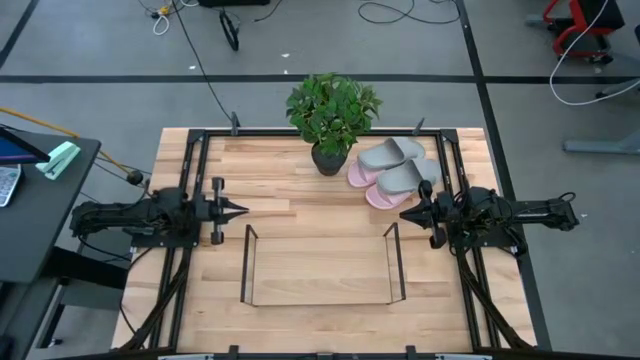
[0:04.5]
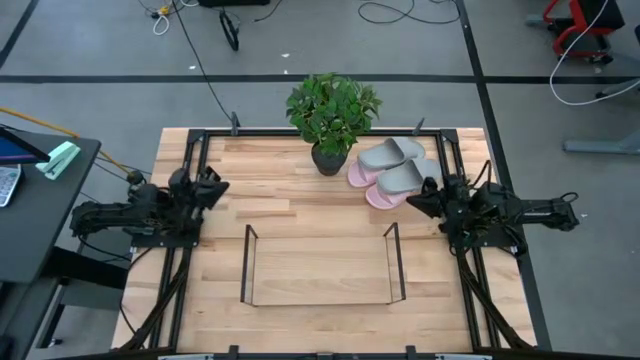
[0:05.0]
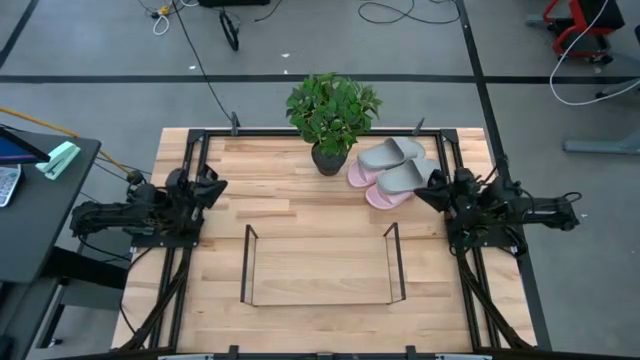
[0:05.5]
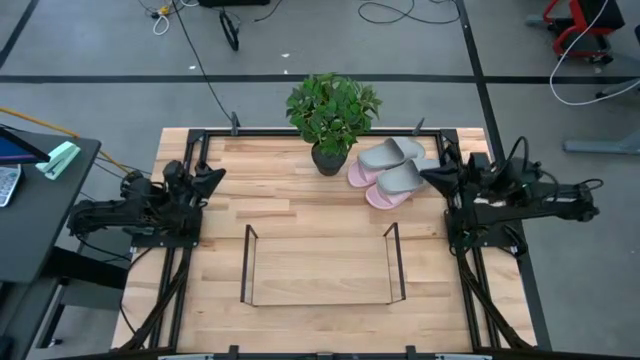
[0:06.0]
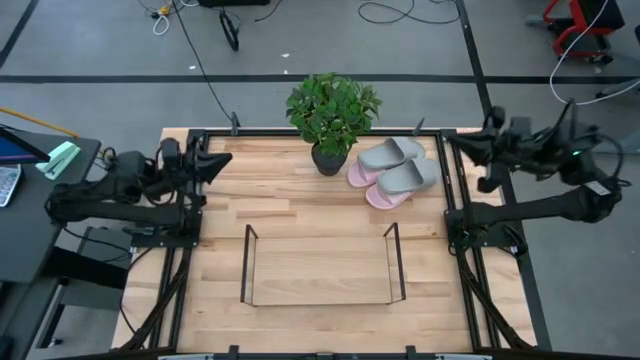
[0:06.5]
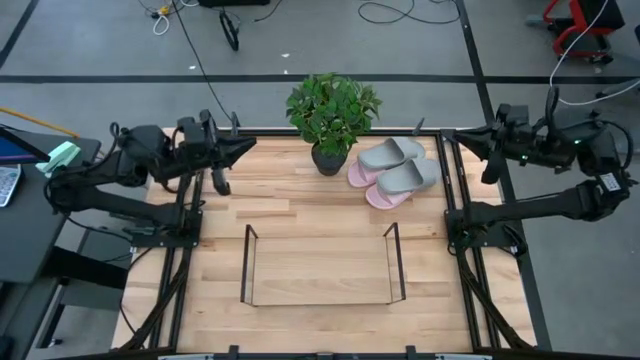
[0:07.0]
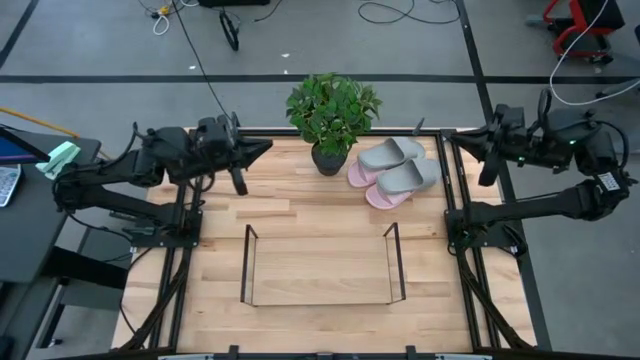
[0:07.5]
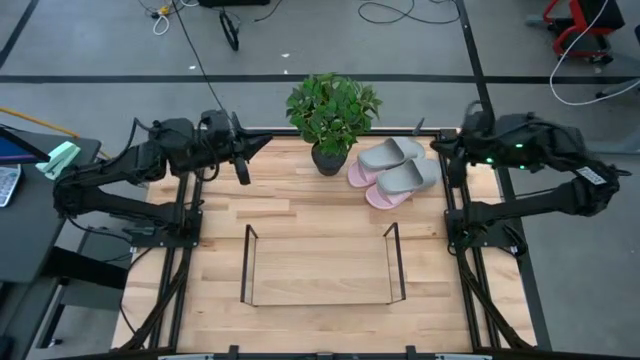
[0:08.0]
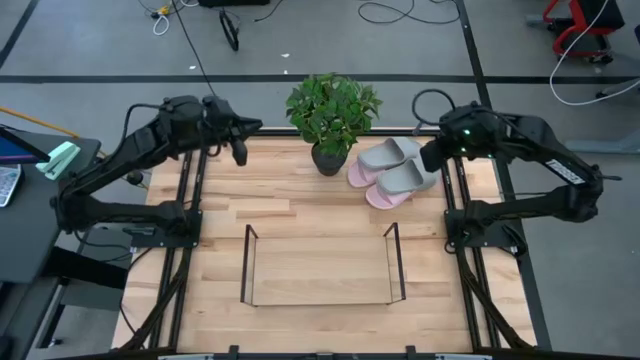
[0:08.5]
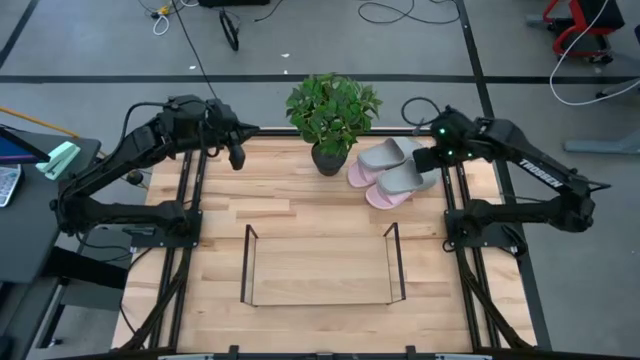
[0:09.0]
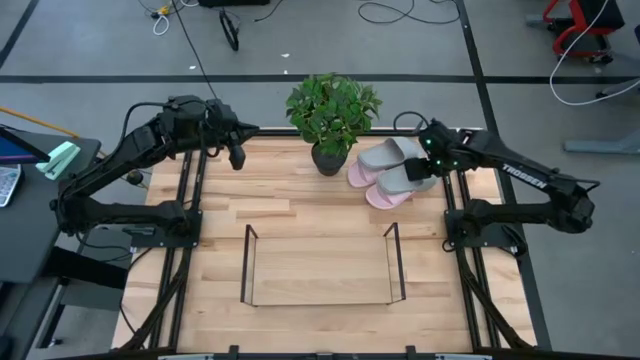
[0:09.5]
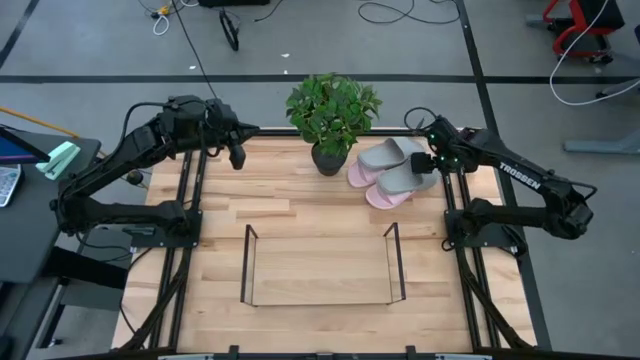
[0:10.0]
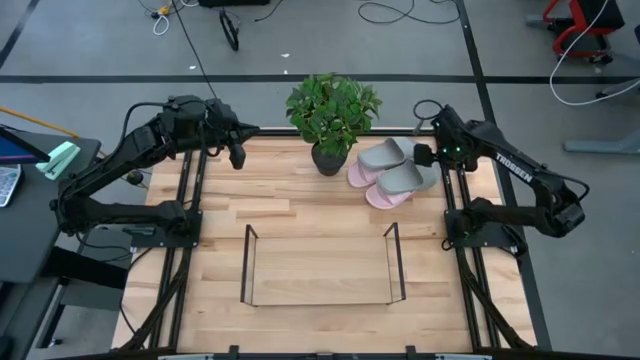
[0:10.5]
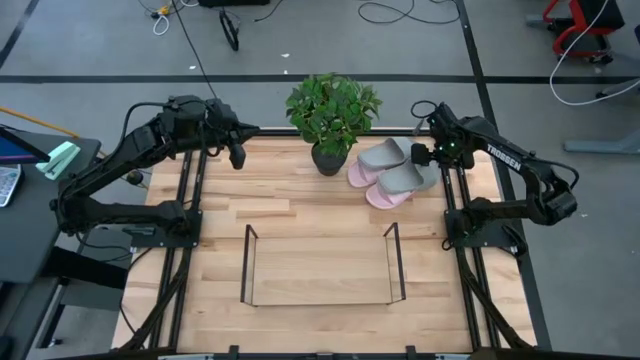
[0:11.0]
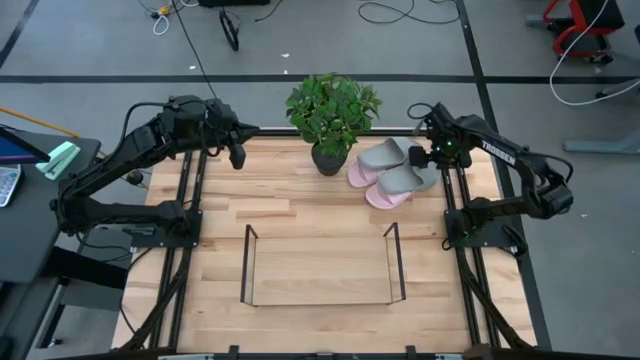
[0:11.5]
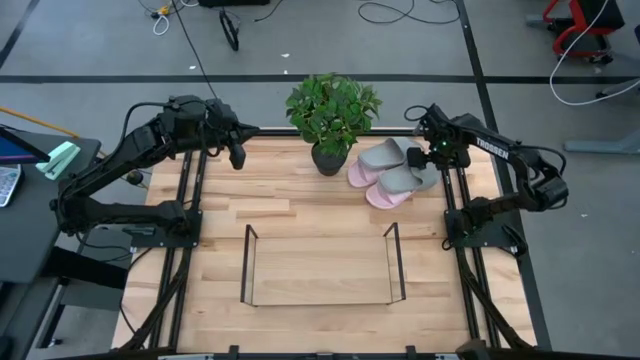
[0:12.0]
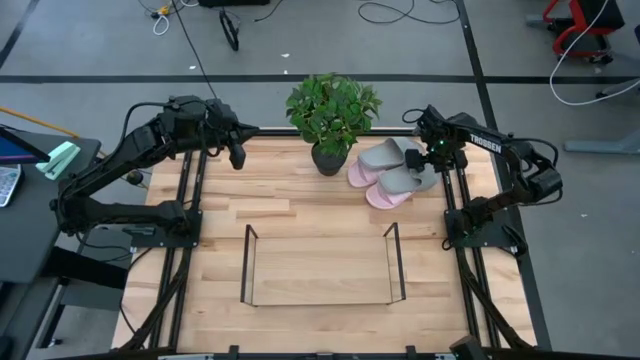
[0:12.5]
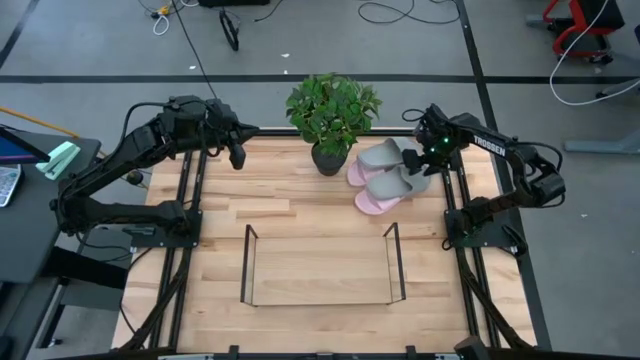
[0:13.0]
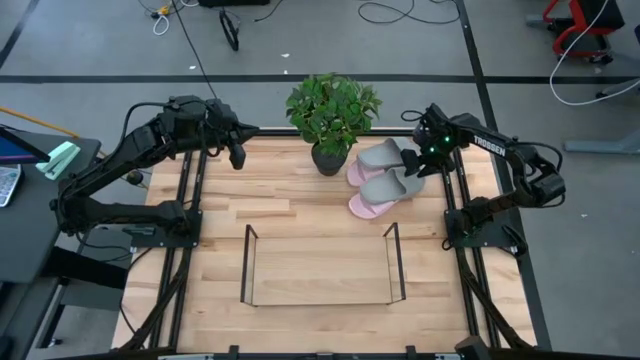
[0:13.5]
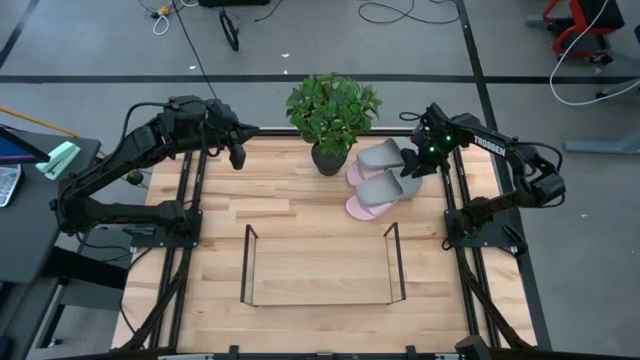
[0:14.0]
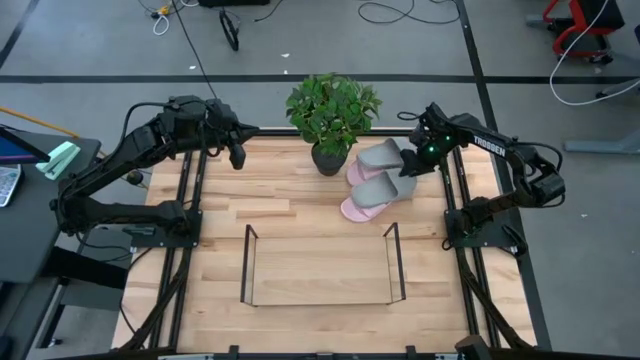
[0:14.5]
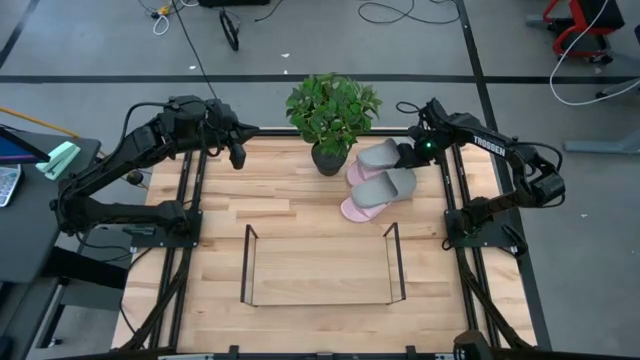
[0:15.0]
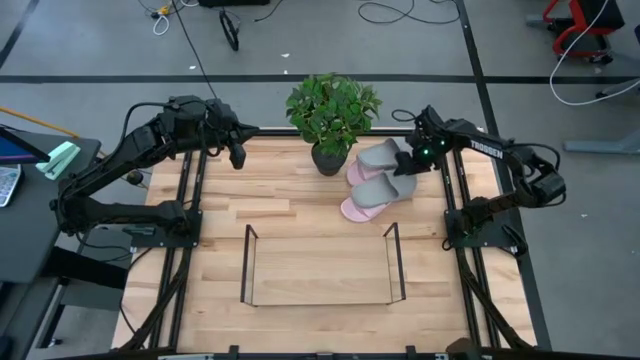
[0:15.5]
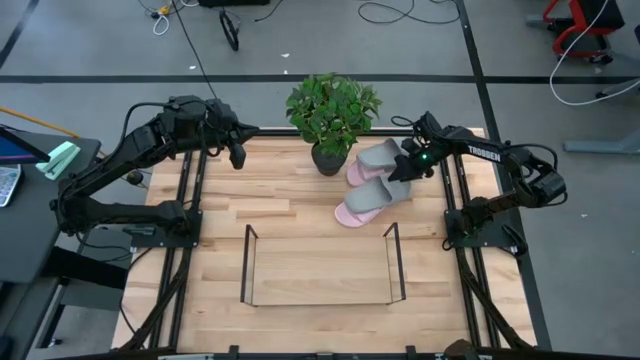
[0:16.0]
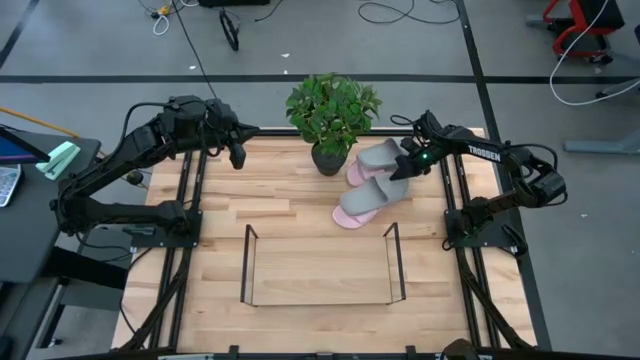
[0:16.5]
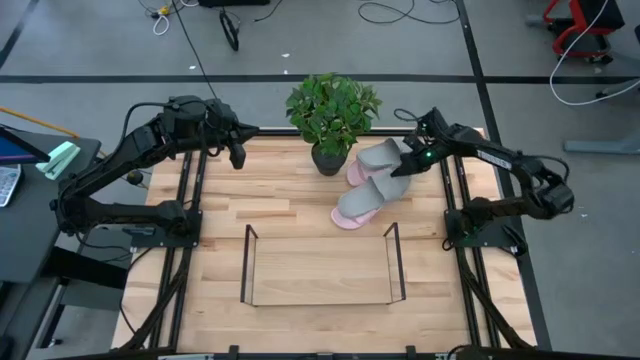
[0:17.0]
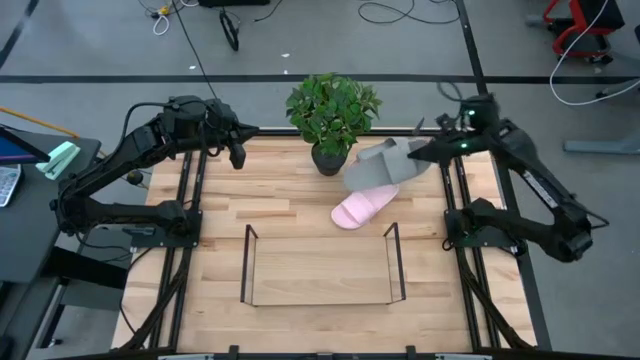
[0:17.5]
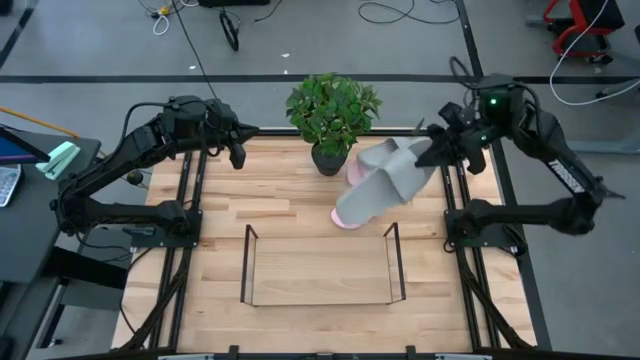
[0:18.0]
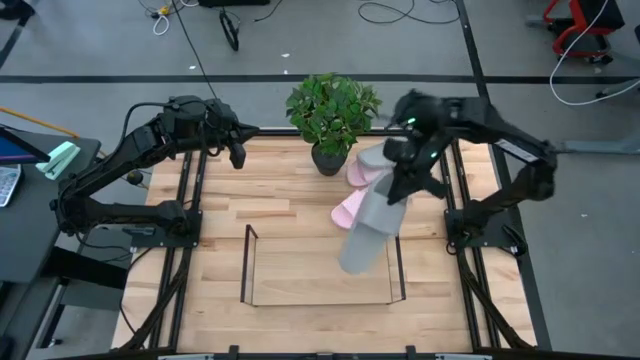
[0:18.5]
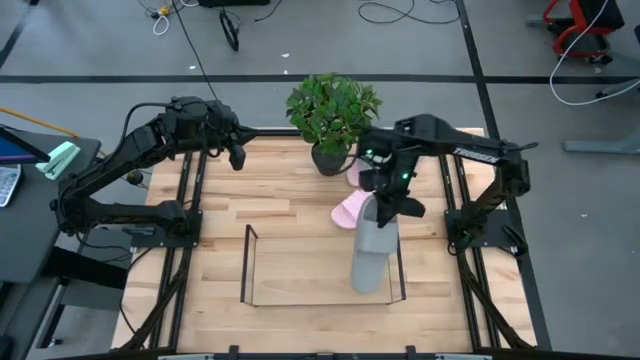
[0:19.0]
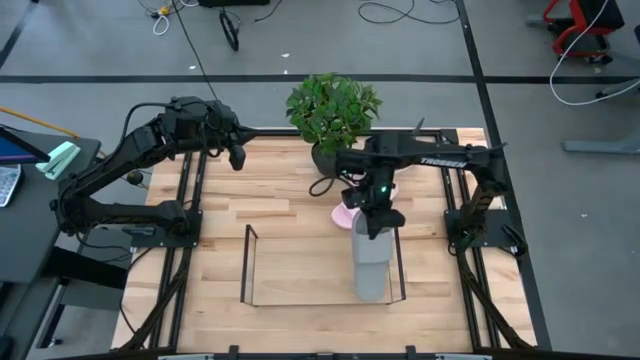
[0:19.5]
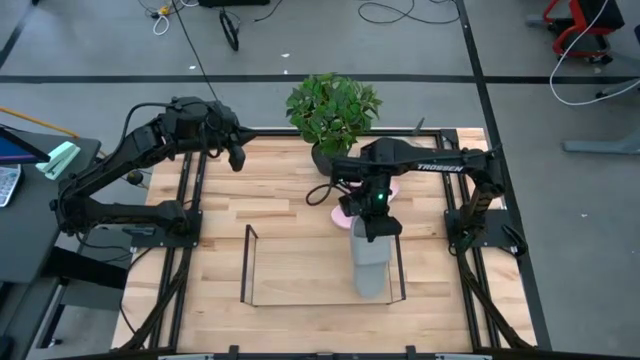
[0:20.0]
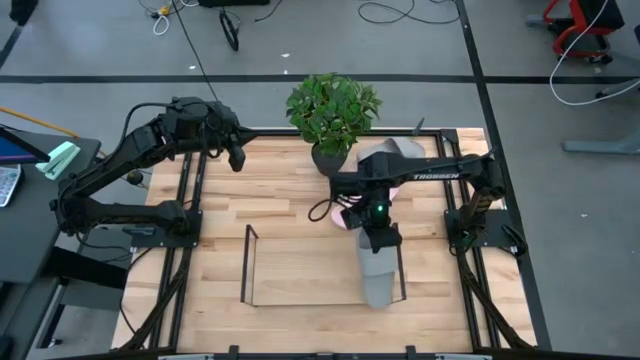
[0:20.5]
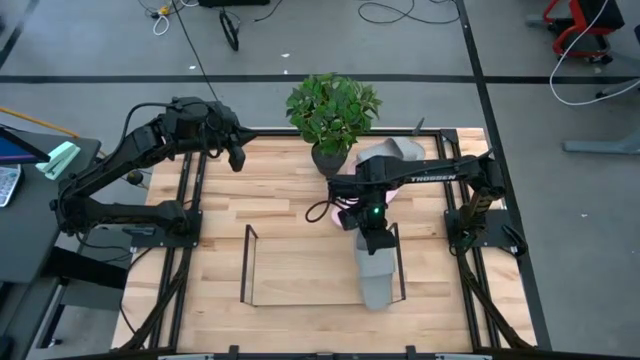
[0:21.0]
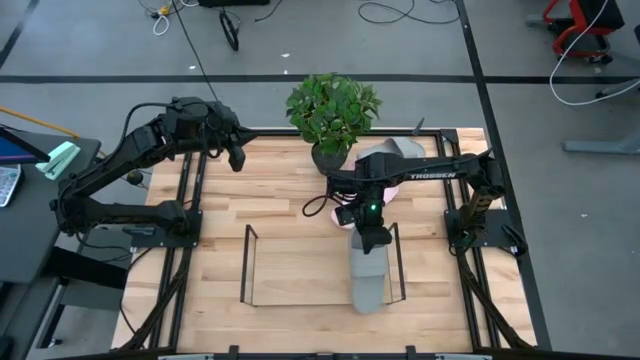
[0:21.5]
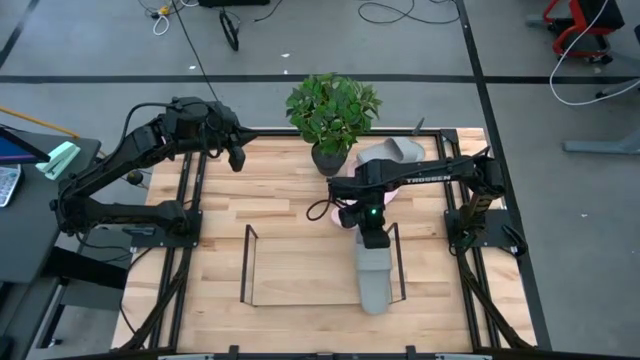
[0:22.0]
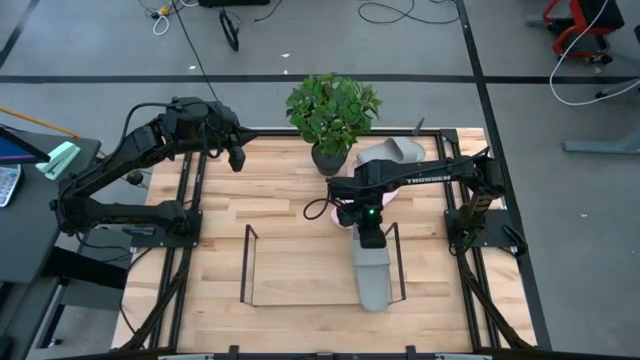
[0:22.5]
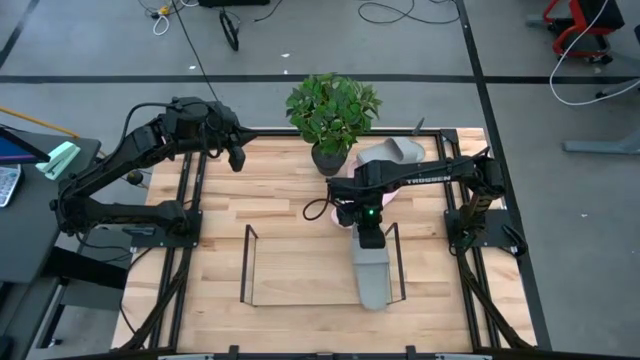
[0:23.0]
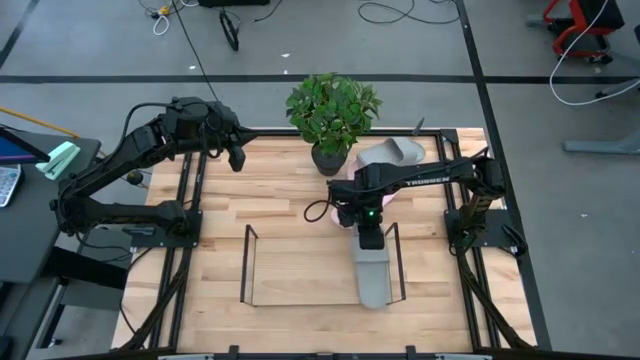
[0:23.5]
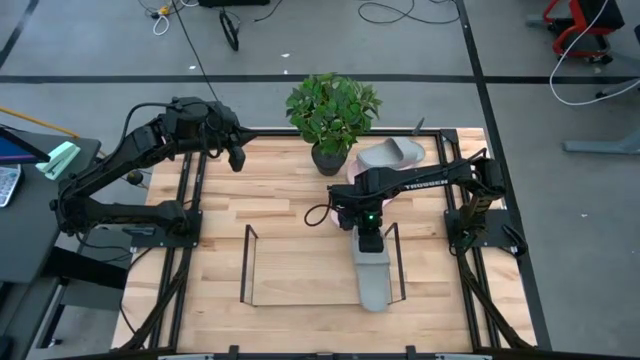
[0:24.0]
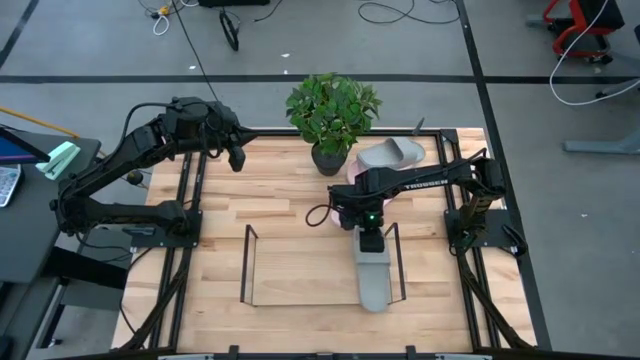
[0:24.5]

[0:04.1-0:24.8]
Task: Pick and place slides into the shelf
Put the bottom gray slide on the shelf
